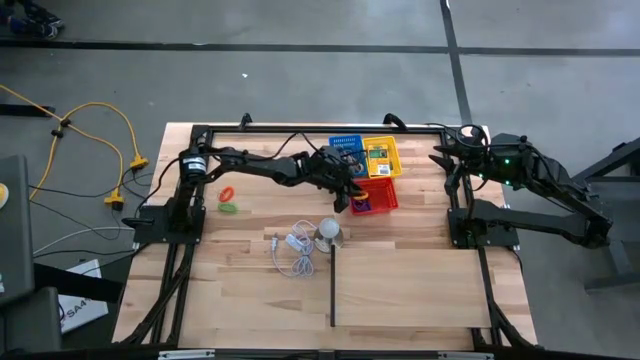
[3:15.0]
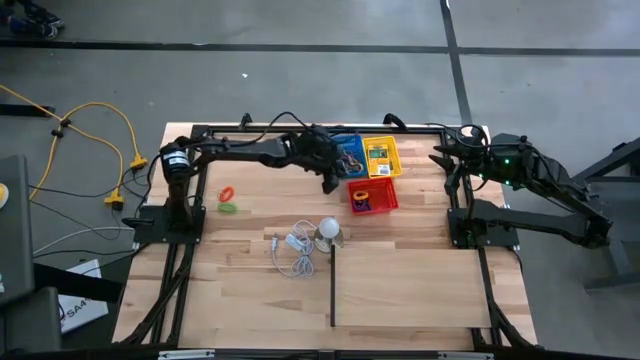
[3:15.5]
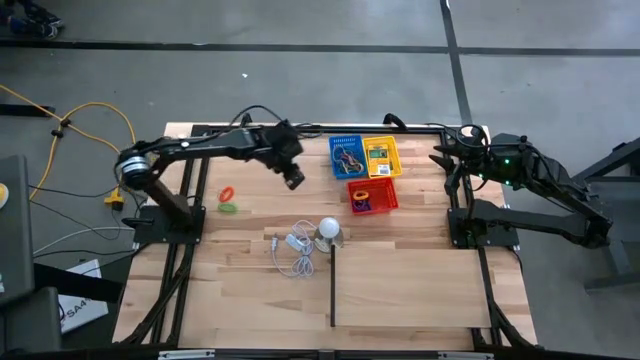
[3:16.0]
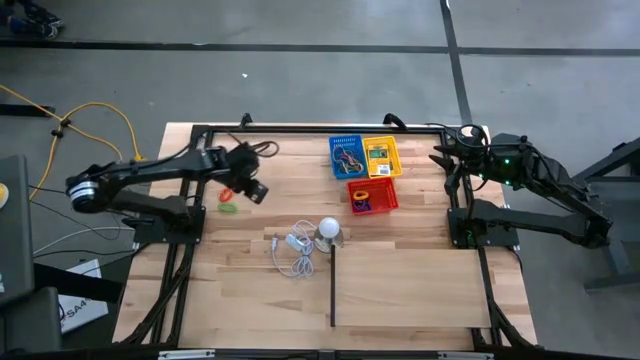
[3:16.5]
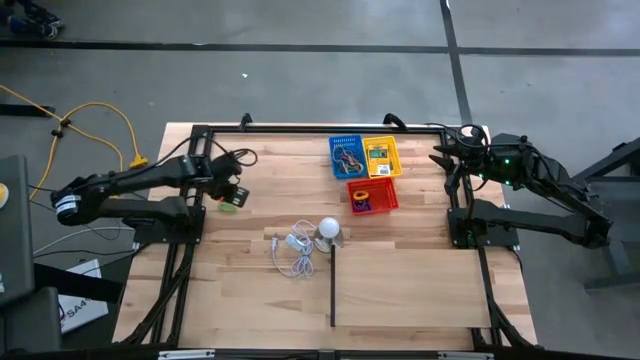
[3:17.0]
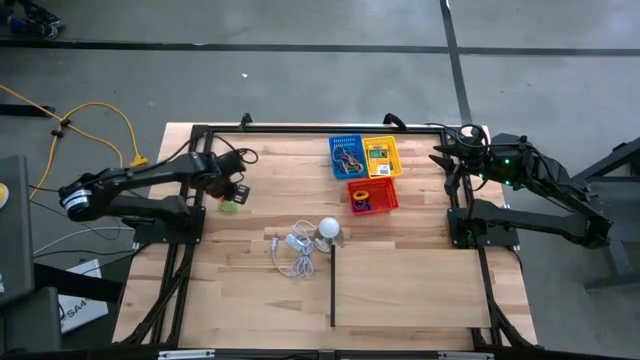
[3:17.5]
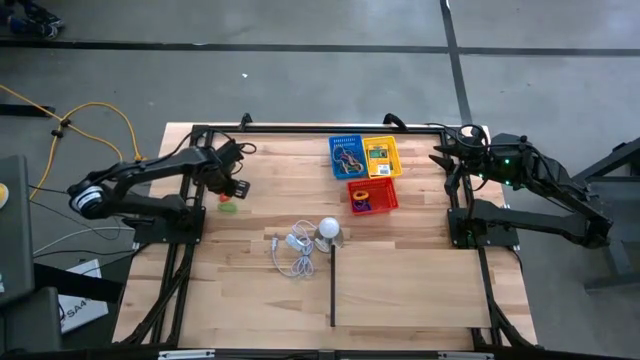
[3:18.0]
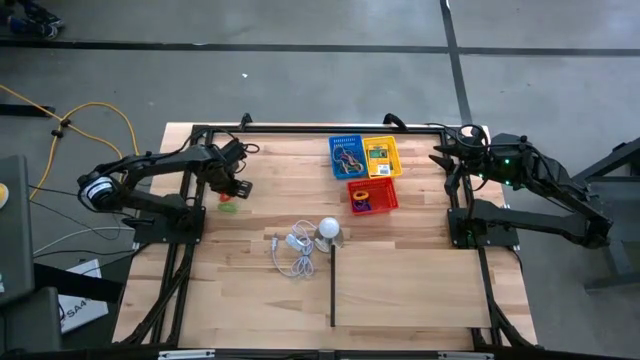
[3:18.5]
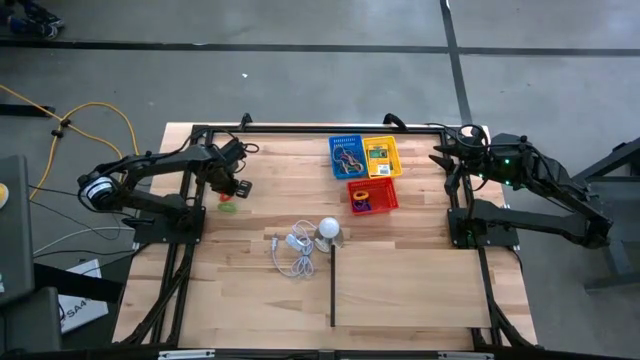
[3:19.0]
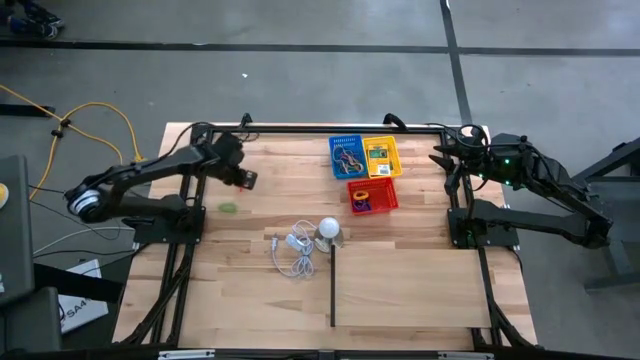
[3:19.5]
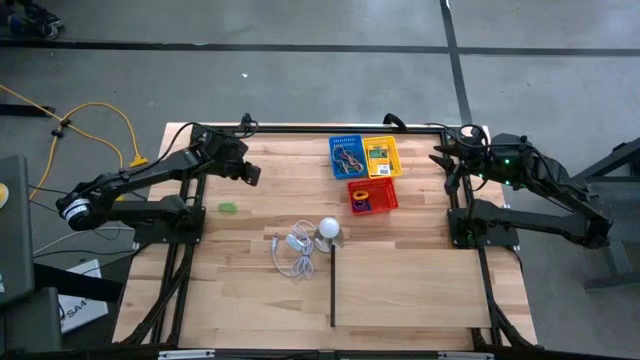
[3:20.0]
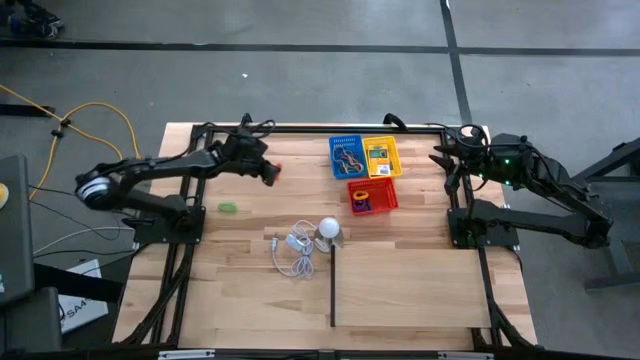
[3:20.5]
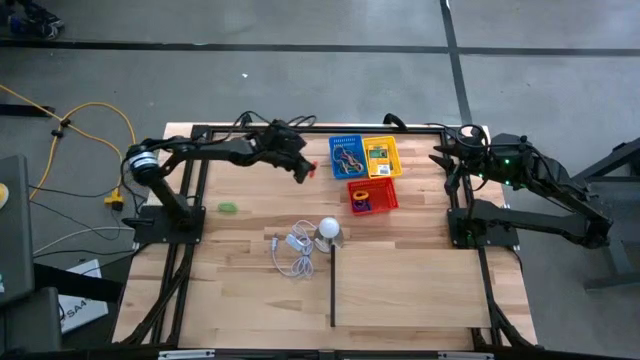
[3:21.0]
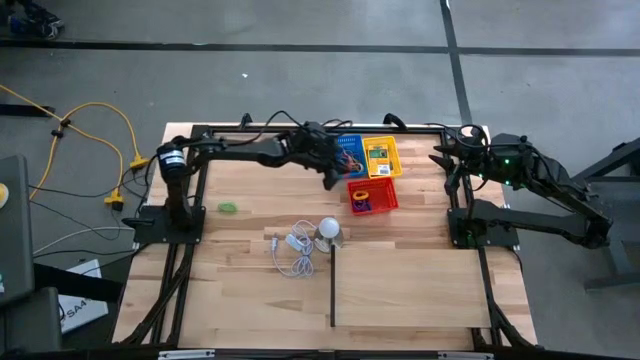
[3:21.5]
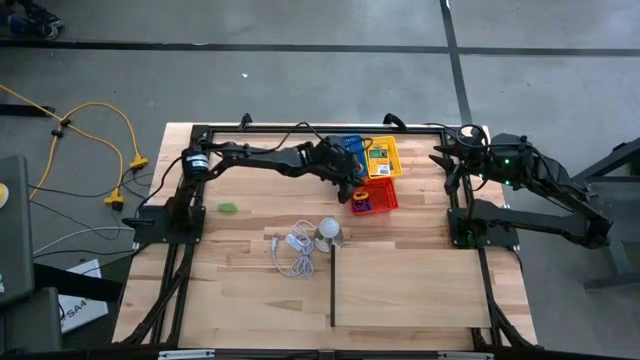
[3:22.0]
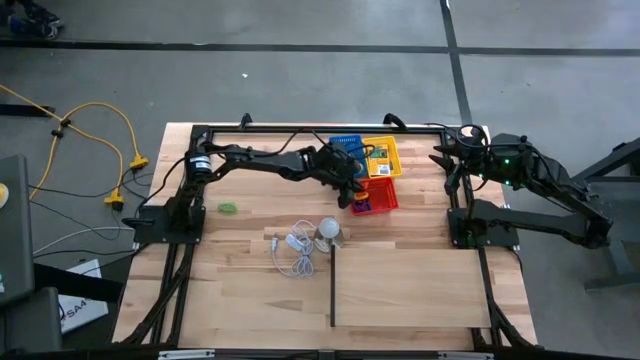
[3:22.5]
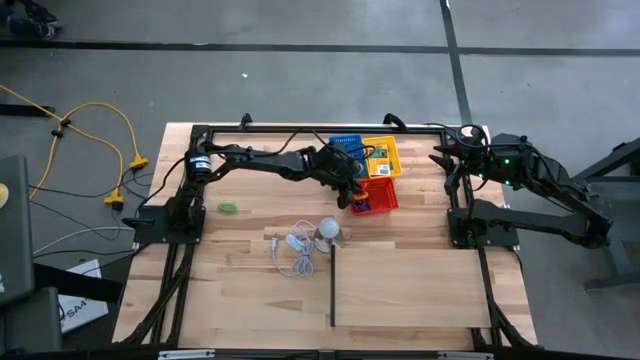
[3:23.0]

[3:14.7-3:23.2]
Task: Pick & Place Office Desk Supplies
Put the orange coil keychain into the red bin

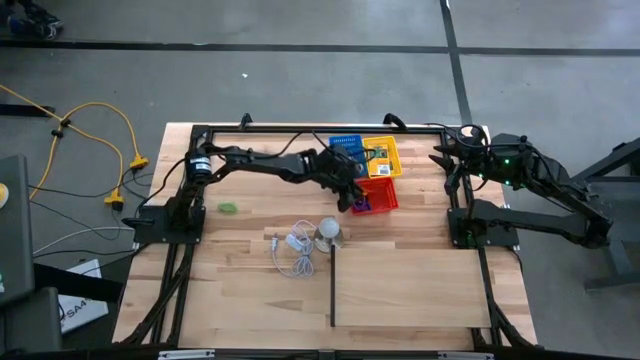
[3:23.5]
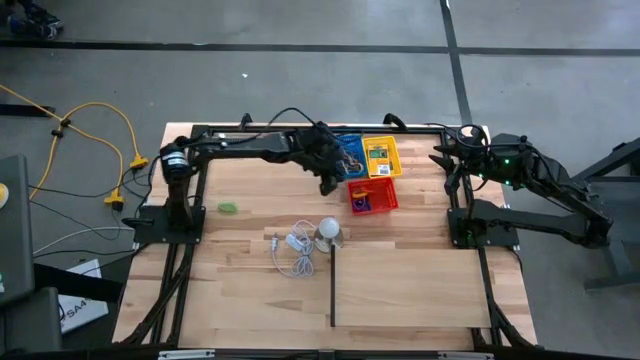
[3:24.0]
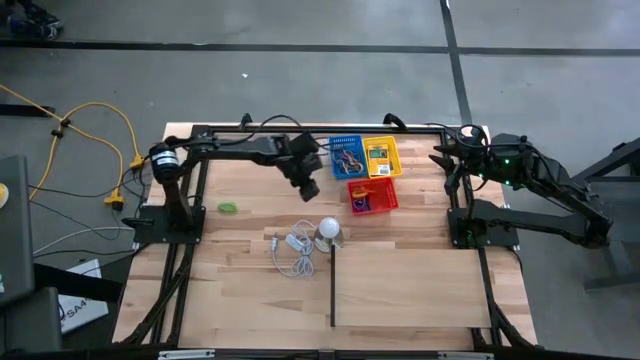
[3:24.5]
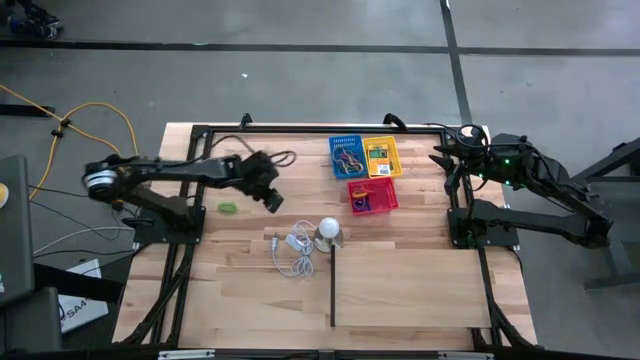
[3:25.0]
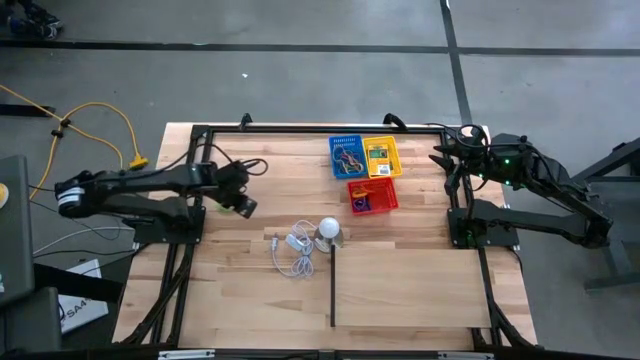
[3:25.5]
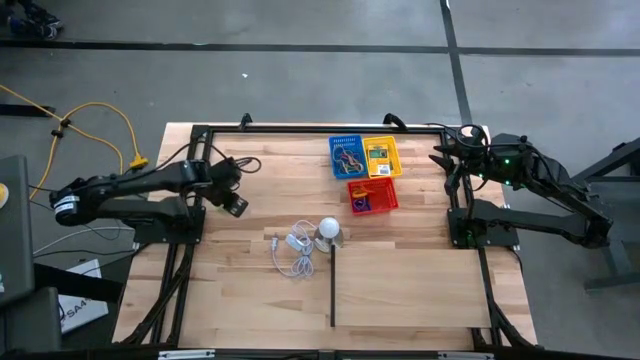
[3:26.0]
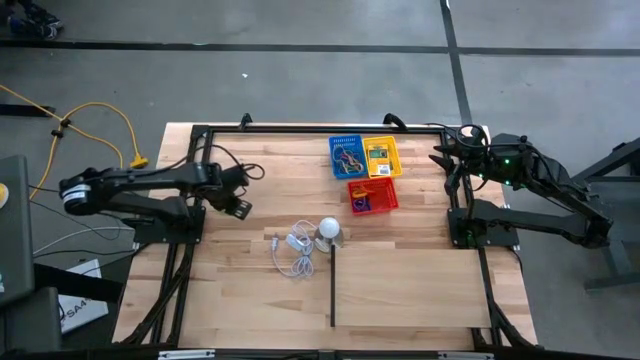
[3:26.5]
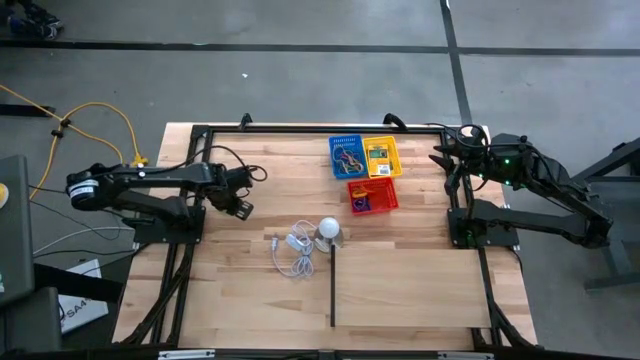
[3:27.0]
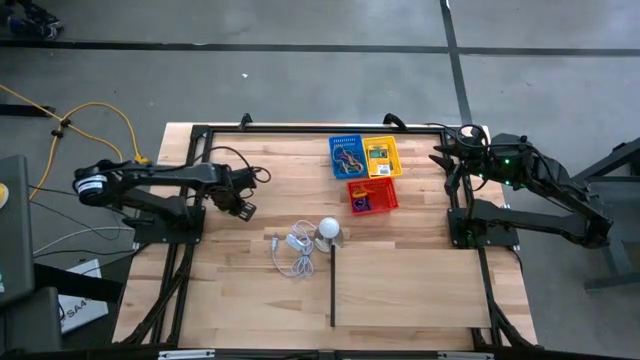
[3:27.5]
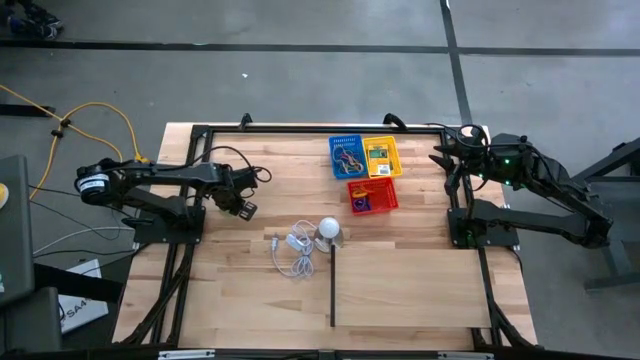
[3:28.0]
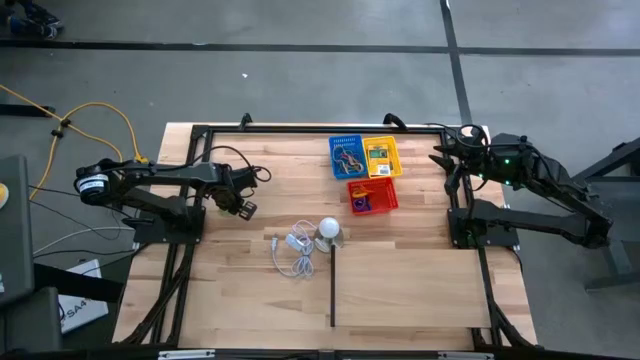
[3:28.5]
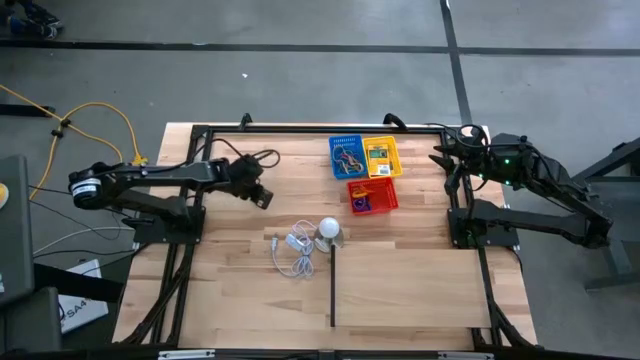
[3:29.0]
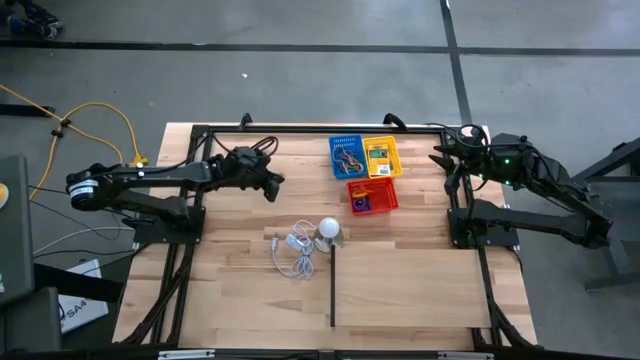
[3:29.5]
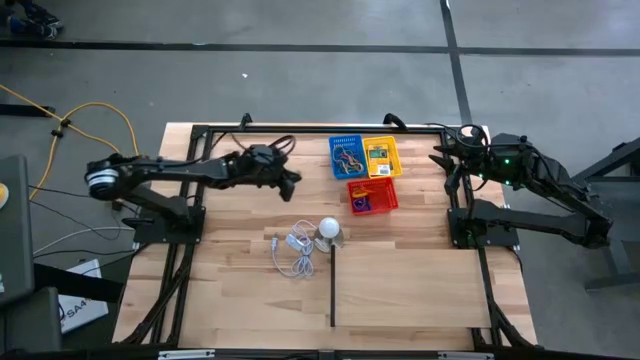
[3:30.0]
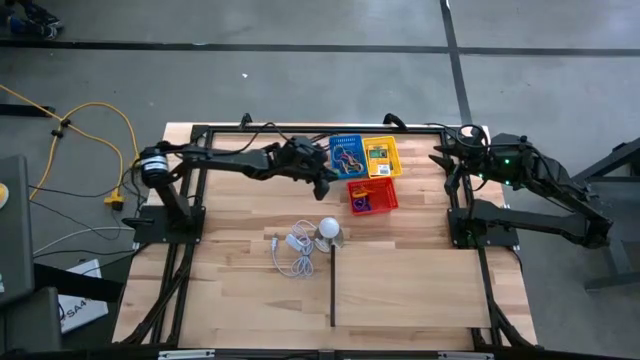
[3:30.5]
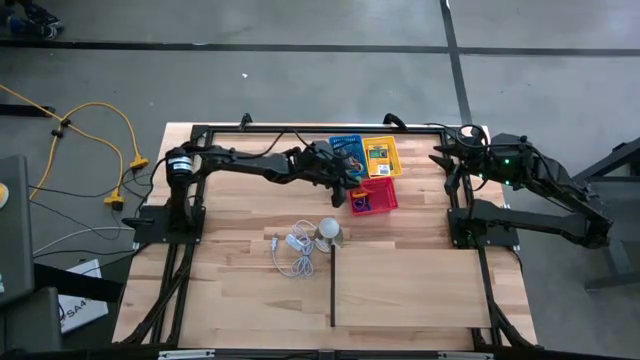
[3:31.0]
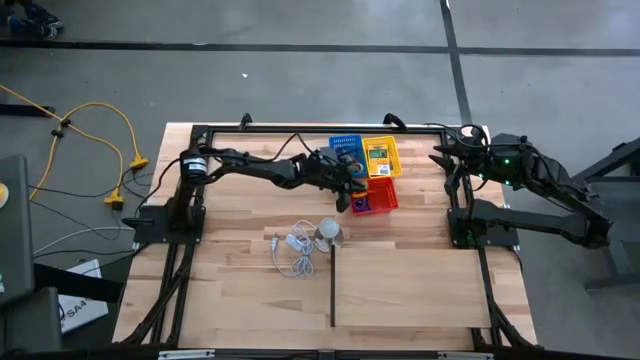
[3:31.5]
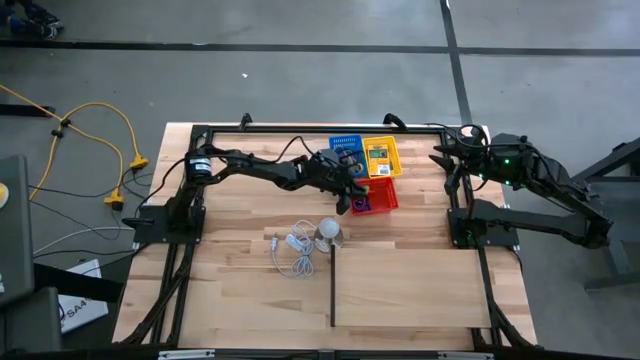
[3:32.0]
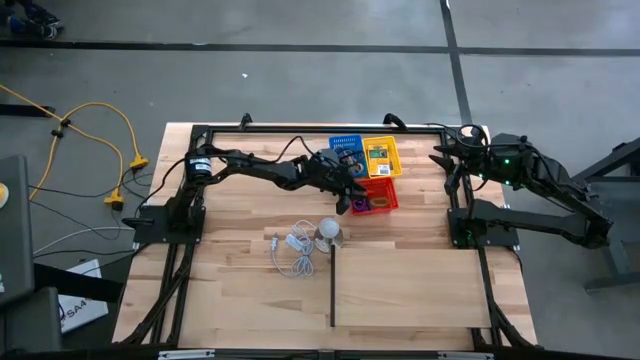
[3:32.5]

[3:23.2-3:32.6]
Put the green coil keychain into the red bin

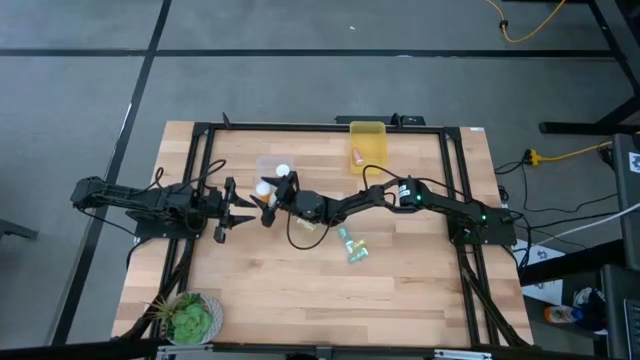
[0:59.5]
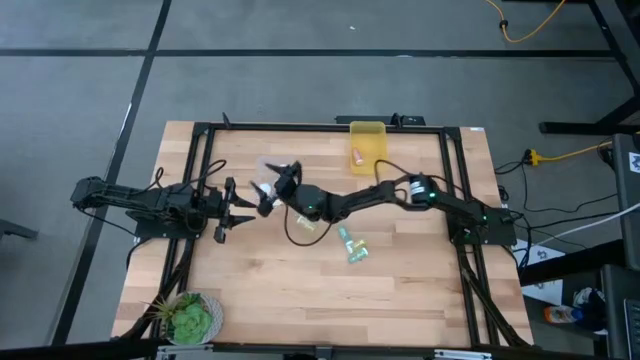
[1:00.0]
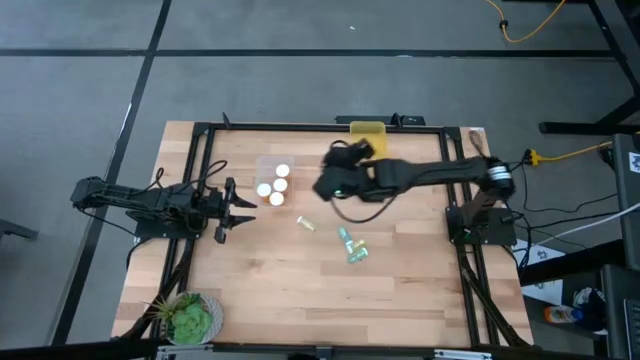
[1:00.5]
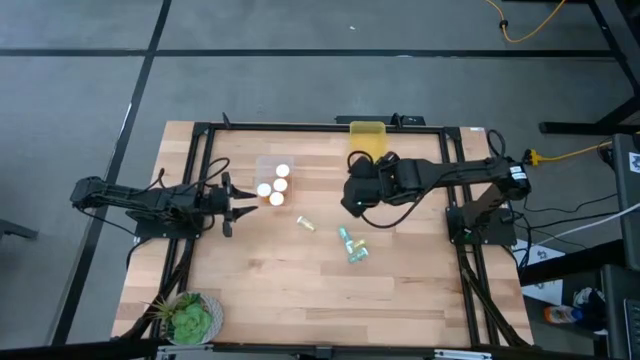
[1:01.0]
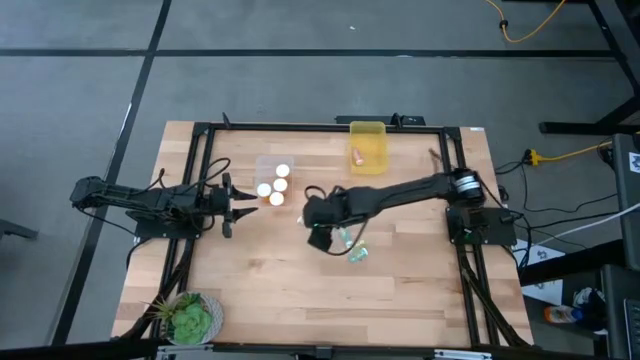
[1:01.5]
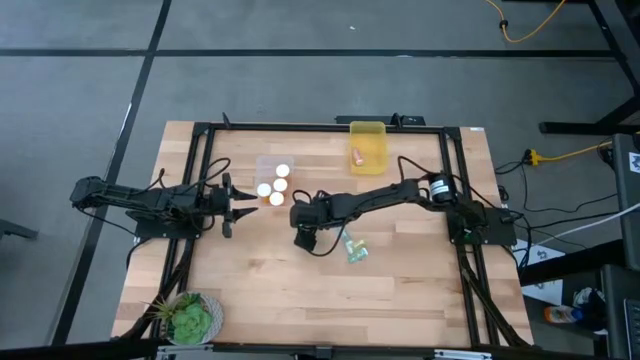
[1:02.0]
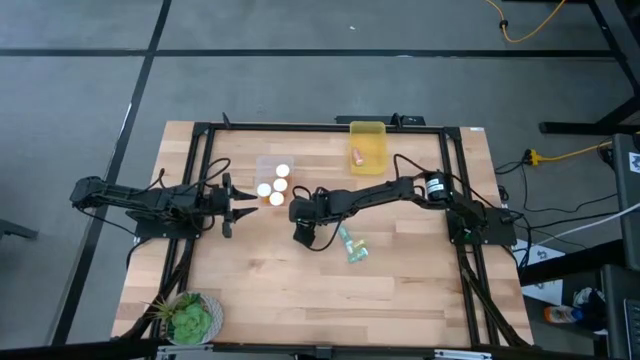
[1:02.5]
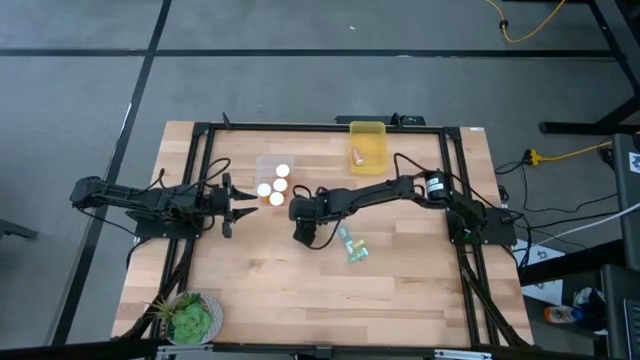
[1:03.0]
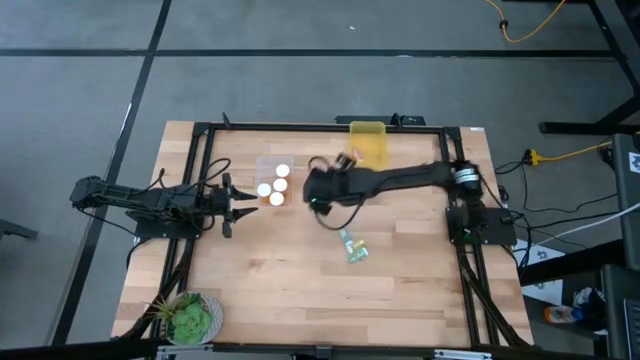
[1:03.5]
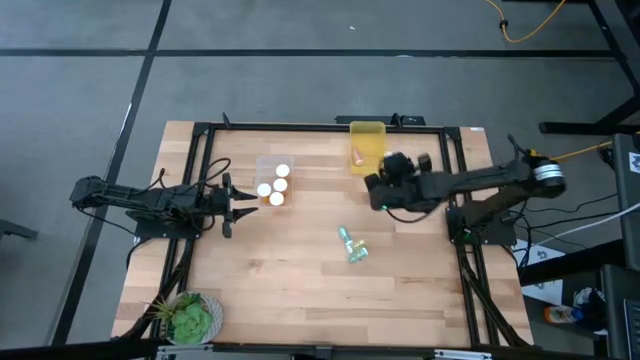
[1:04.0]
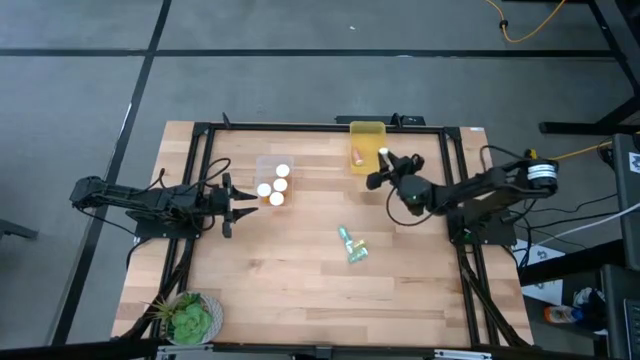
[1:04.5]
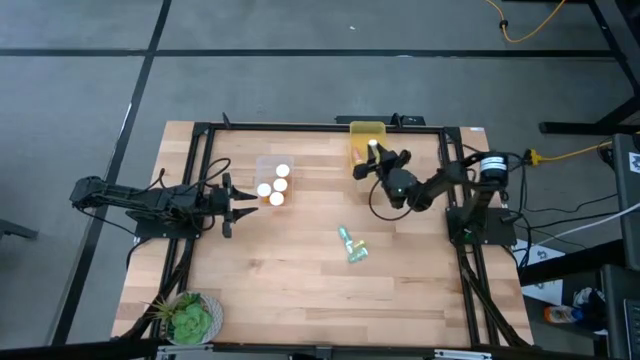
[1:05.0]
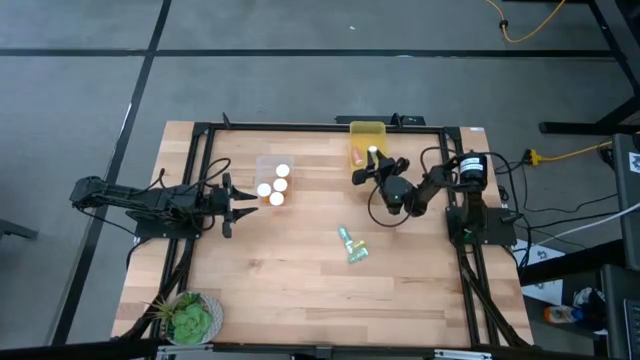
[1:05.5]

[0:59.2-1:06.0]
Task: Pick and place medicine bottles into bin by pill shape (circle, oval)
Put the small yellow pill bottle into the yellow bin
